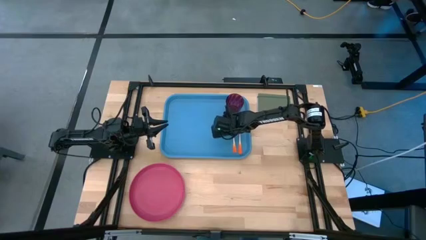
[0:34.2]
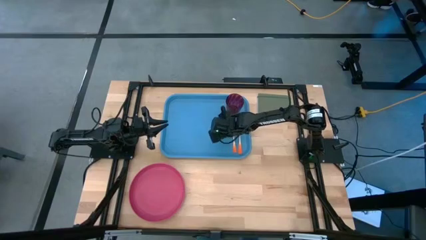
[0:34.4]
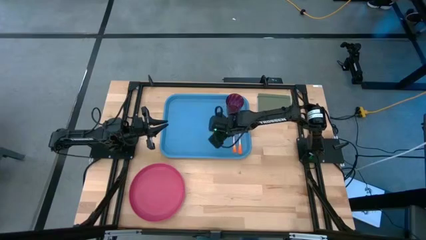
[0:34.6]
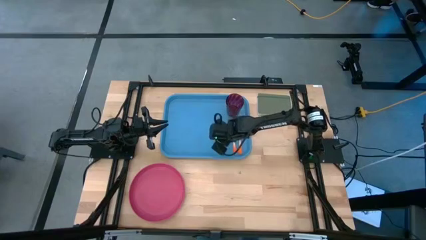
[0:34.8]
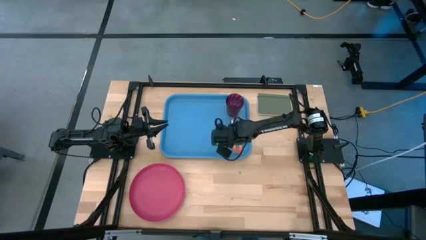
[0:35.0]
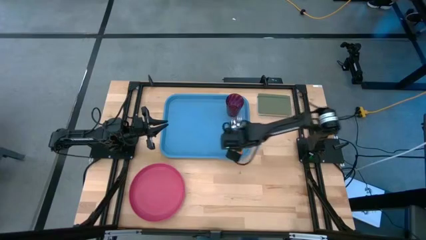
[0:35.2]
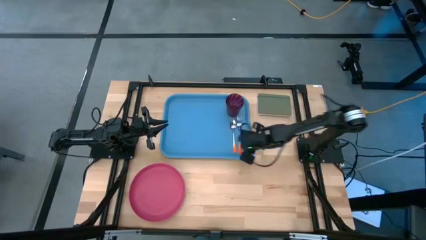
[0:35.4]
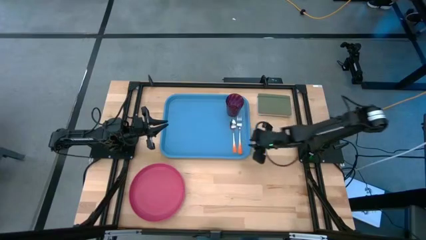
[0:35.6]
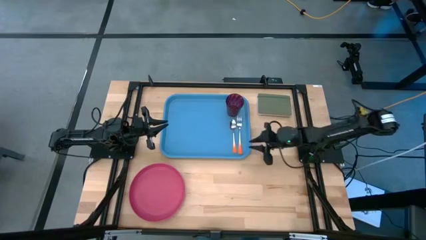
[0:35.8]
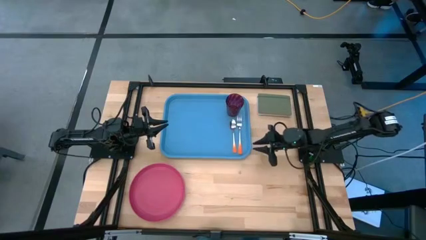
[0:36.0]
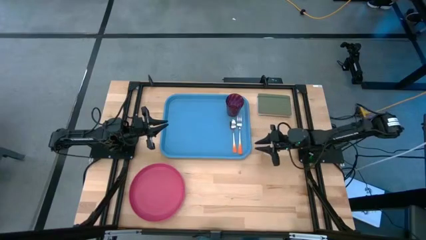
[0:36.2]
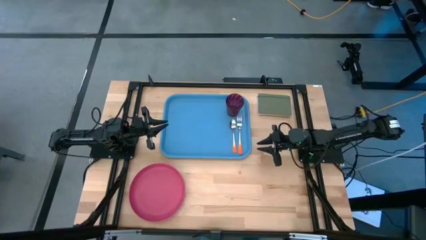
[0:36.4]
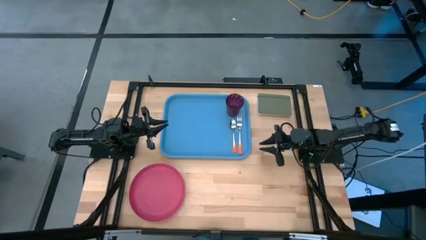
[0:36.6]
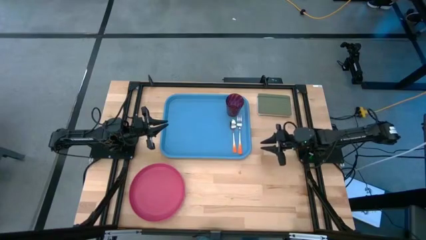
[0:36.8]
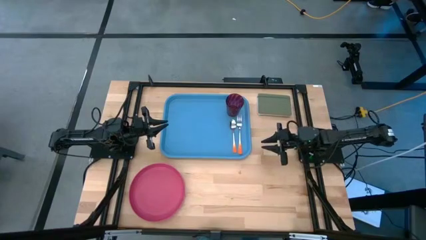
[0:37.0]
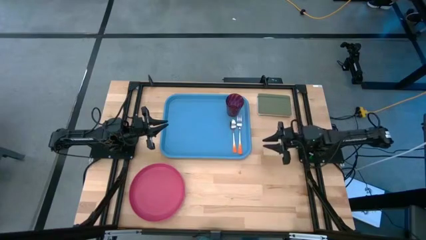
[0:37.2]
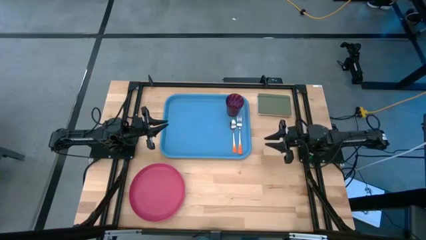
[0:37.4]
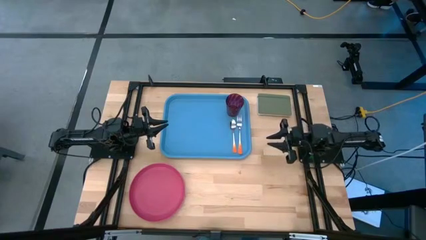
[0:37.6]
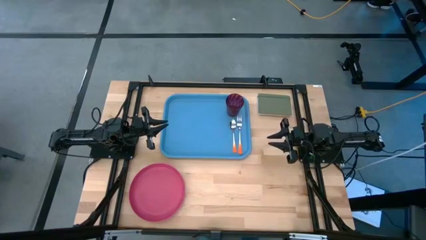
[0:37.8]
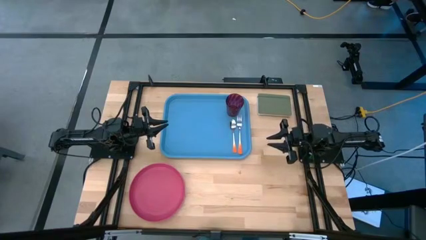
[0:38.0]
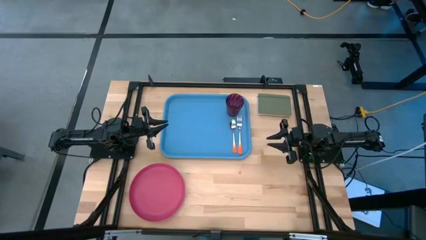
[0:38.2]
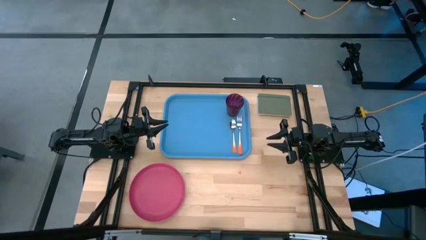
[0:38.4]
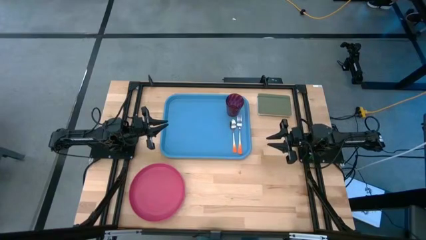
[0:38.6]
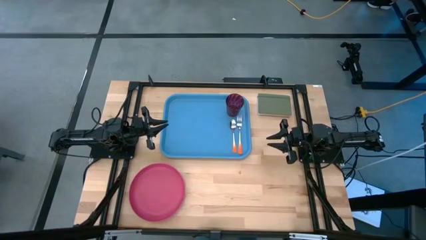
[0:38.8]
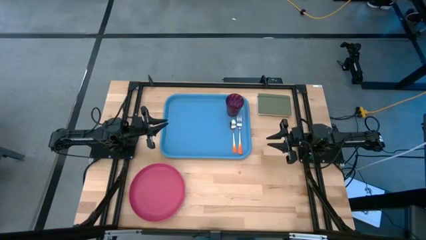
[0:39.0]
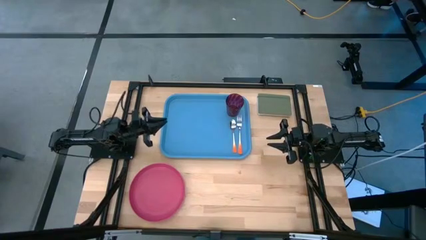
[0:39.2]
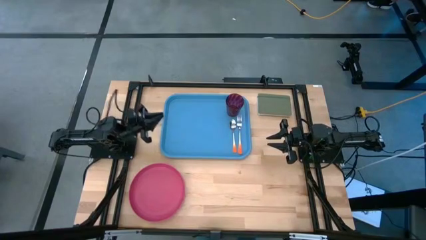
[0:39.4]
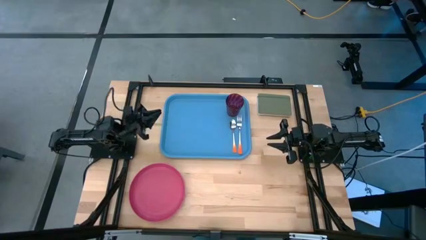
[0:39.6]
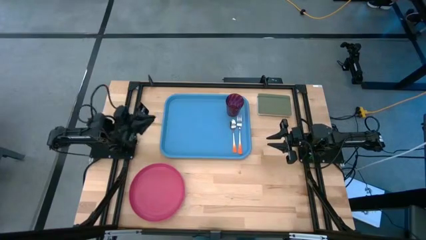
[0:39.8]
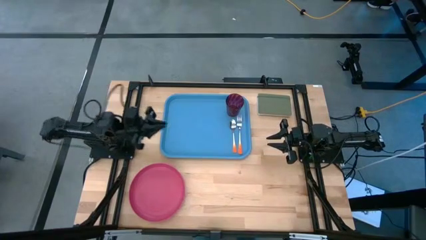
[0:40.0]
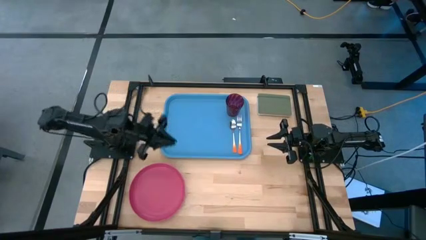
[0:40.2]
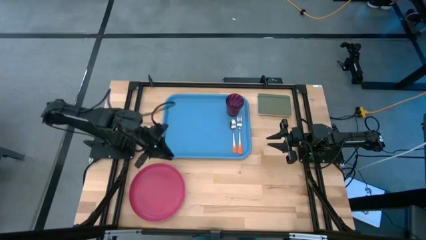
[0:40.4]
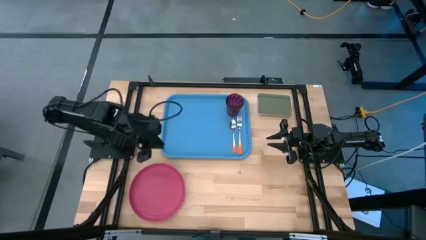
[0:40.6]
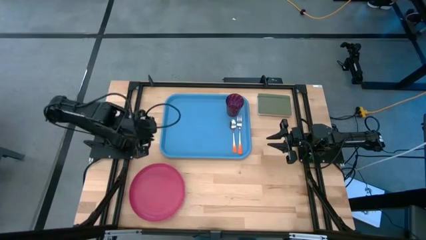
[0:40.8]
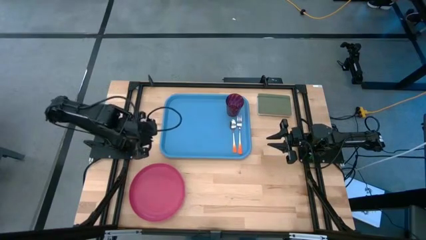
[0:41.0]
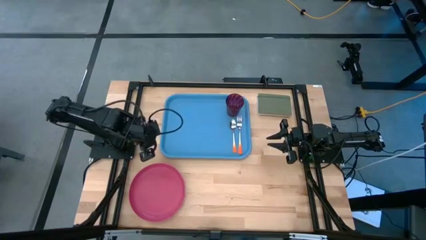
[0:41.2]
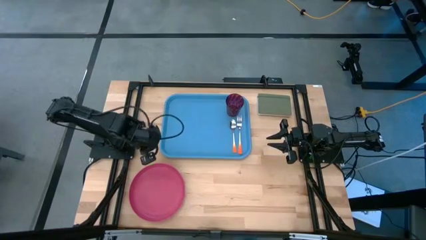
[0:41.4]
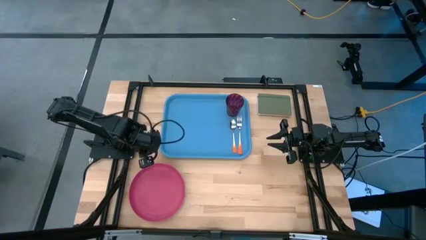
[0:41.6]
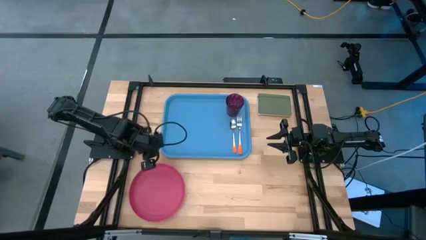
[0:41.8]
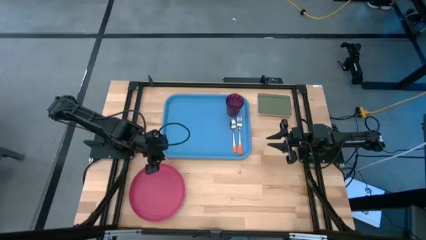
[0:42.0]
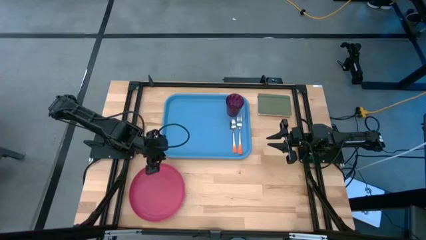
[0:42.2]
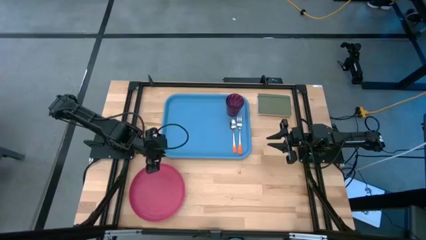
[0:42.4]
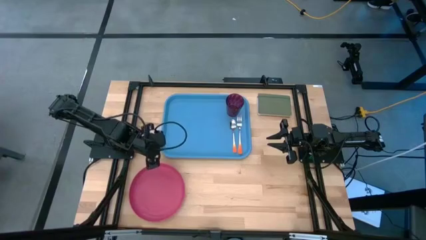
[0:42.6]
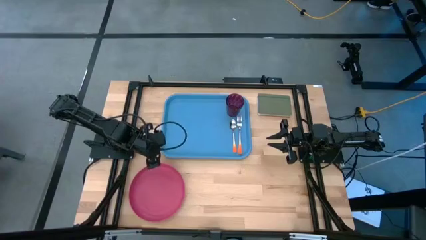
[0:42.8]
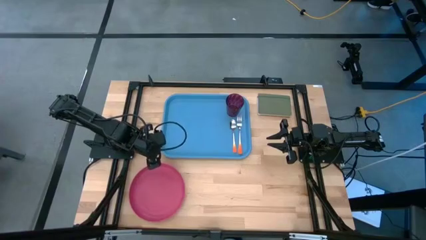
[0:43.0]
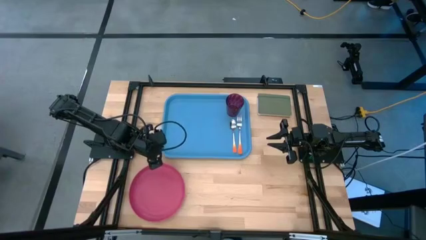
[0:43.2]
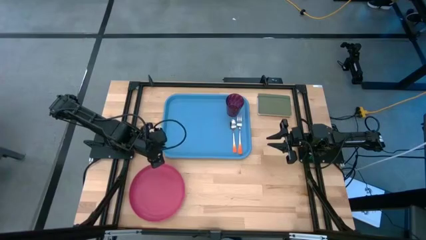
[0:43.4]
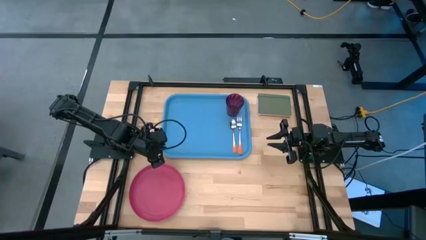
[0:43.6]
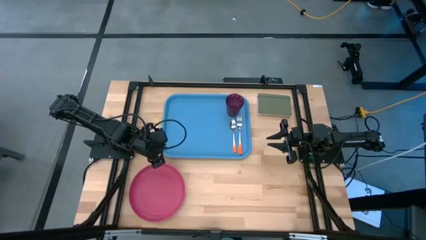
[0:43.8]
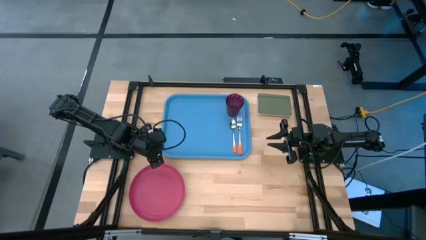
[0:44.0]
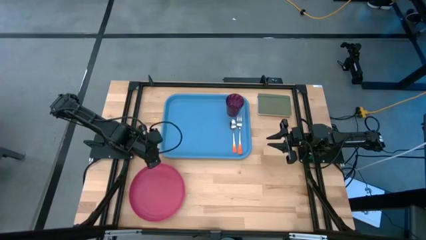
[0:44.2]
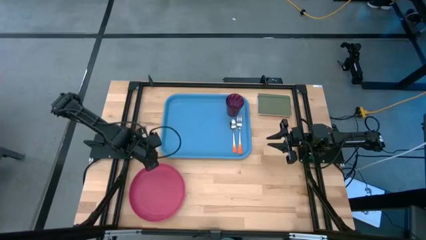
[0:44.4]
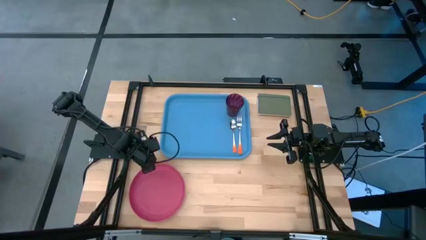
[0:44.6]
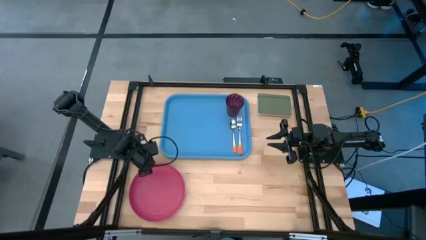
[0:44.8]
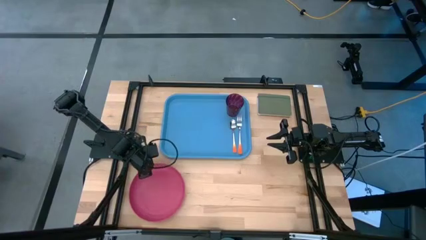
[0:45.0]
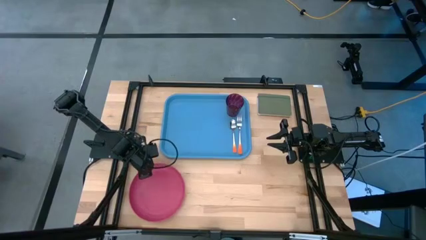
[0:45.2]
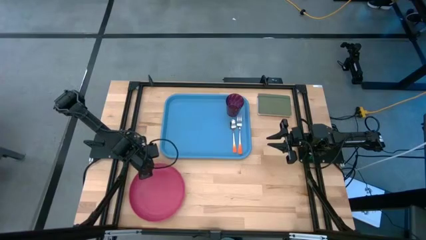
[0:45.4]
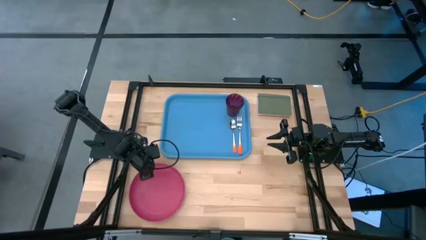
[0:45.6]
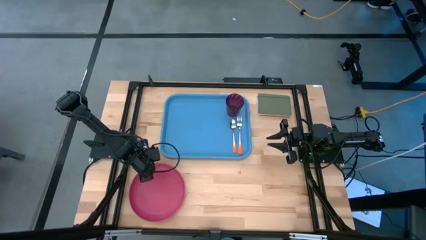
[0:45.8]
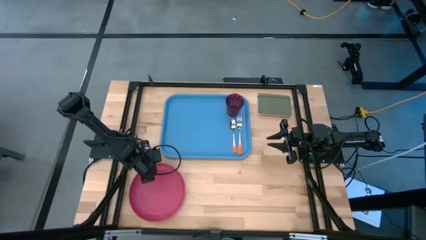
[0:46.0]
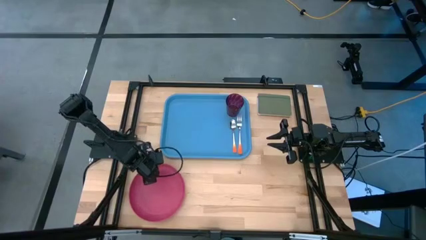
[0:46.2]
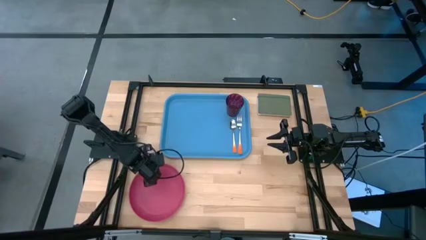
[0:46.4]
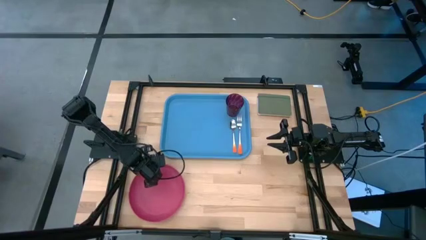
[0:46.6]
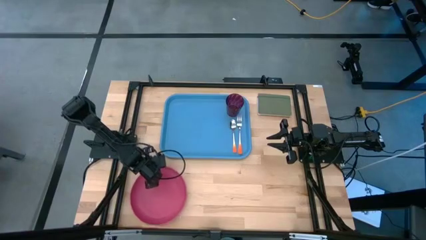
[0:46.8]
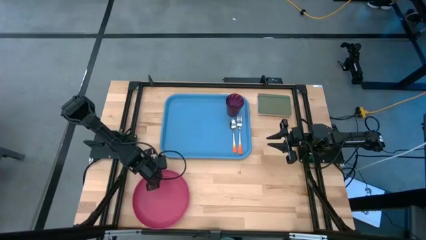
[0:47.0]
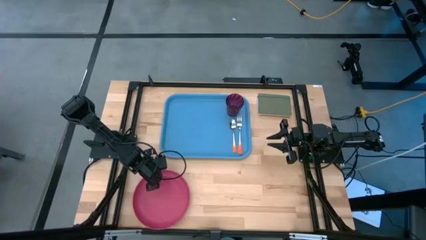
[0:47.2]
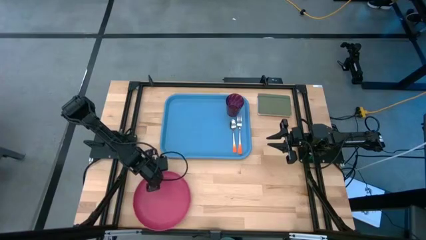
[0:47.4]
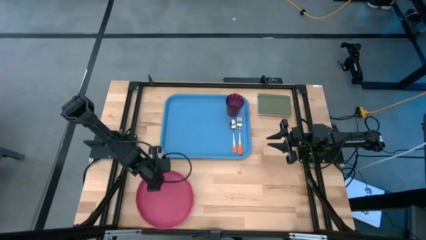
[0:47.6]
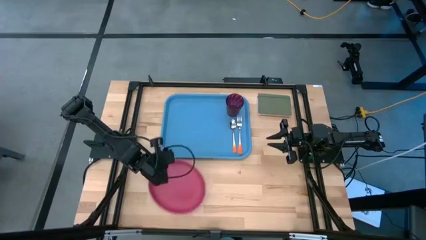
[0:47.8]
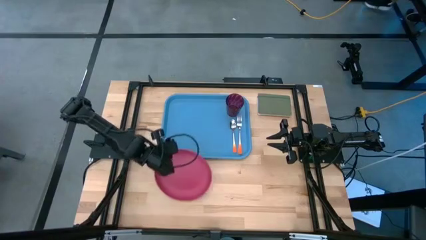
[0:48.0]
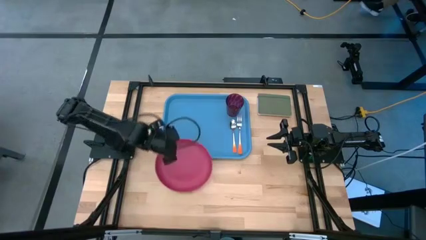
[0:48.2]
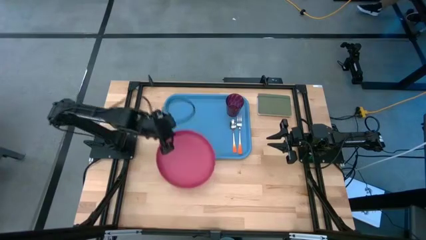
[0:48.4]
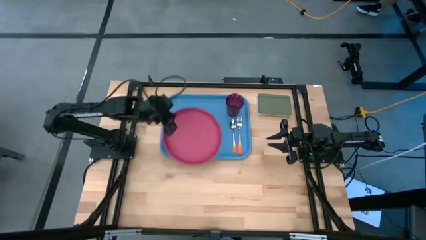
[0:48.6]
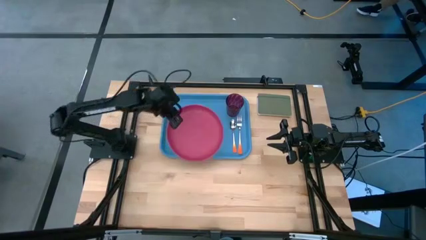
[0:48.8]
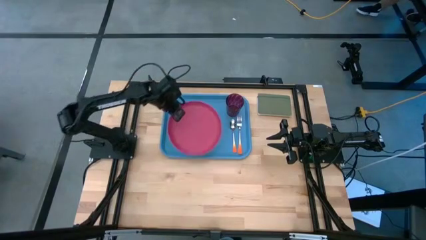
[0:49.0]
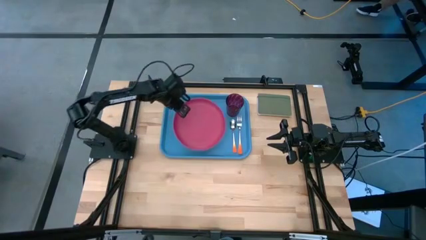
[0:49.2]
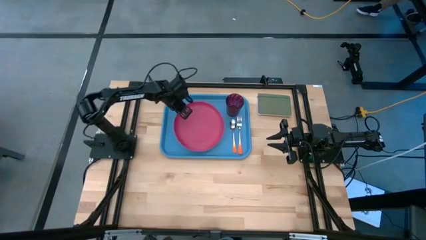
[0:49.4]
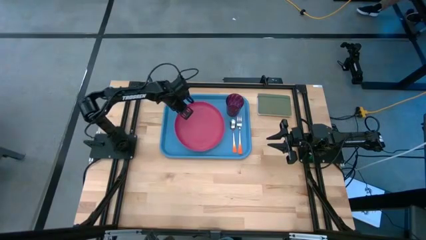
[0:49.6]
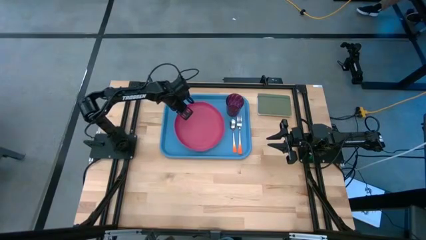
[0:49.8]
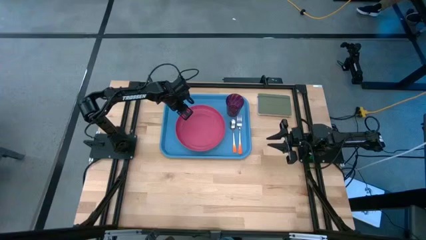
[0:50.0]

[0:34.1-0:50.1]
Task: Pick and place plate/cup/fork/spoon on tray
Put the red plate on the blue tray

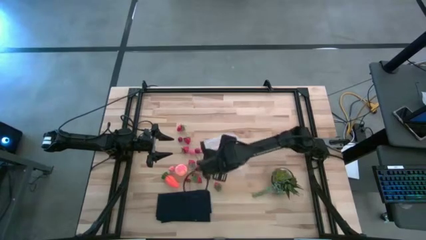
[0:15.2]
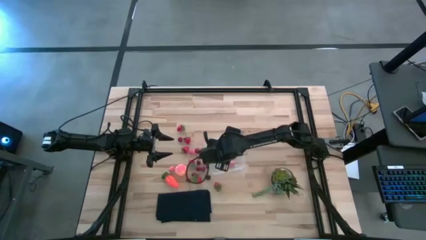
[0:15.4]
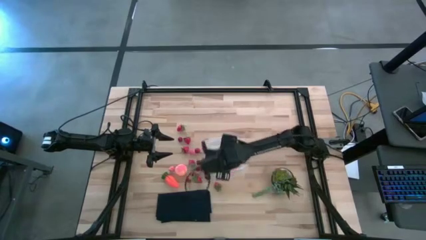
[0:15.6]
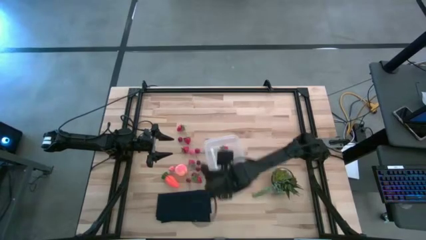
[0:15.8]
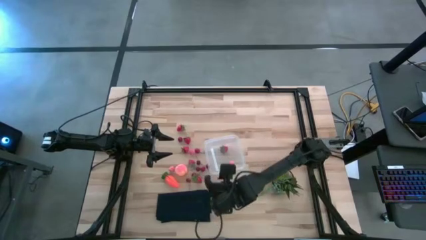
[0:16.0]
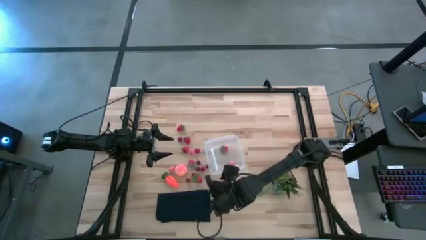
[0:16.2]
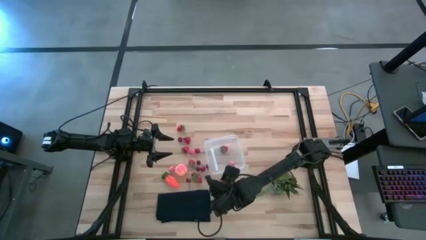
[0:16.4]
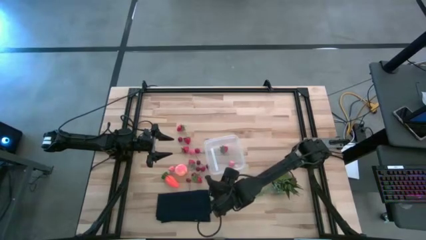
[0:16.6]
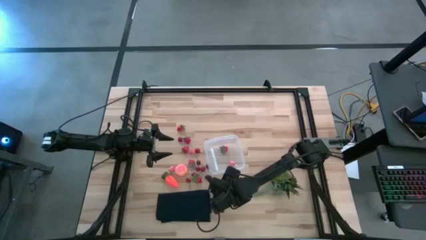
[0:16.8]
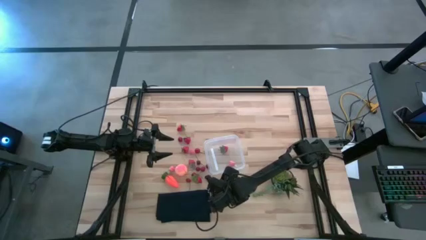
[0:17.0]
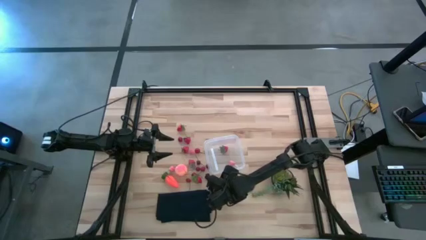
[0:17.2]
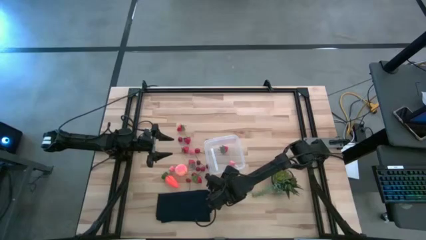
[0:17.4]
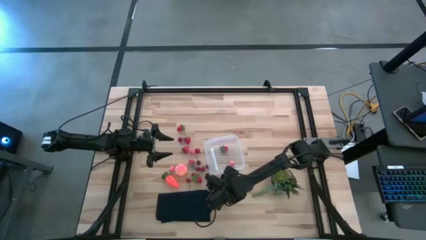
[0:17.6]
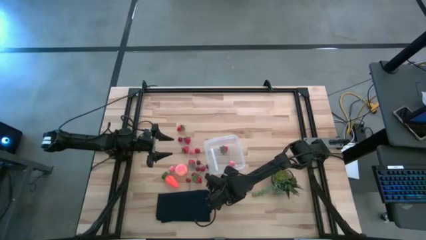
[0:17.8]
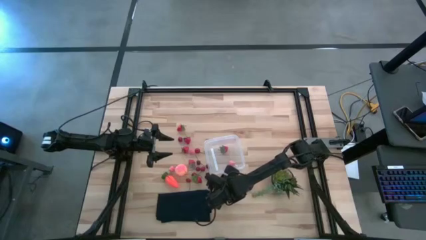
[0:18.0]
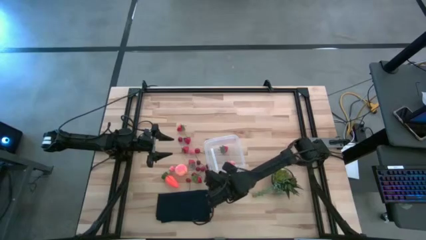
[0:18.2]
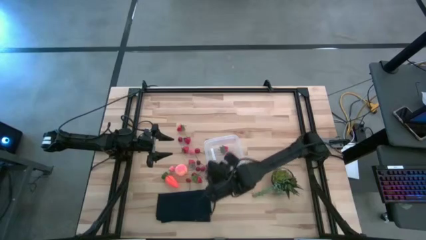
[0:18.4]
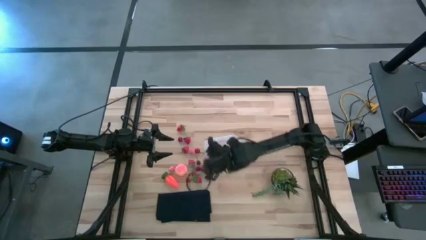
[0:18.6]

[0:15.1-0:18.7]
Task: Pick and placing Produce into tupperware
Put the red strawberry into the container
